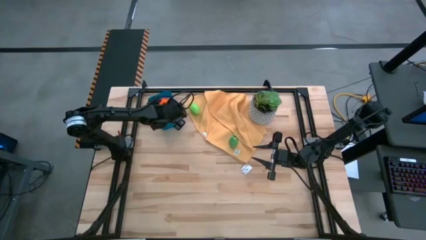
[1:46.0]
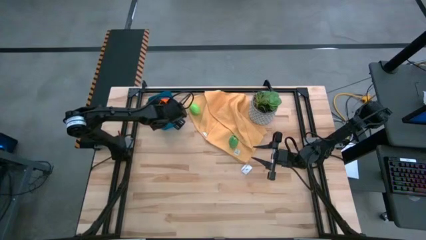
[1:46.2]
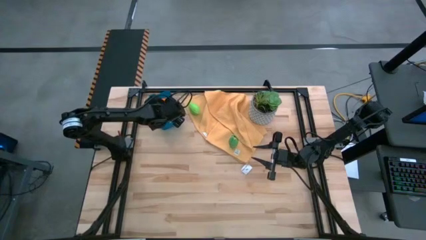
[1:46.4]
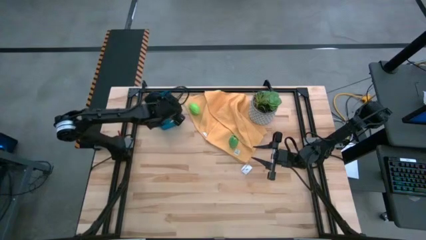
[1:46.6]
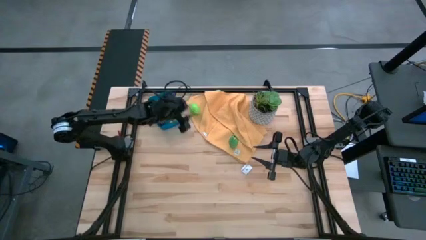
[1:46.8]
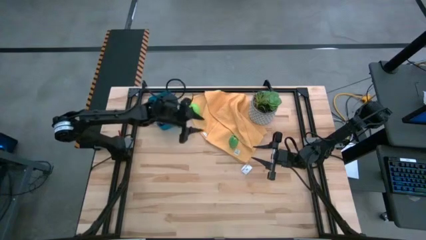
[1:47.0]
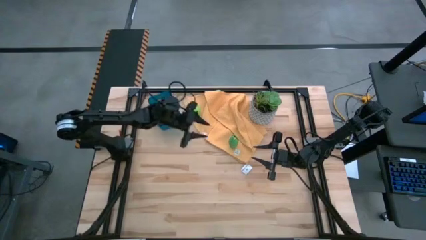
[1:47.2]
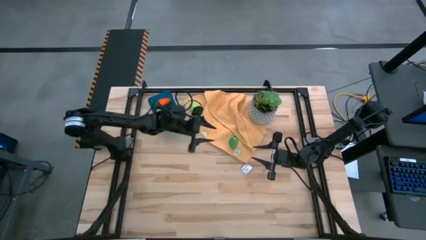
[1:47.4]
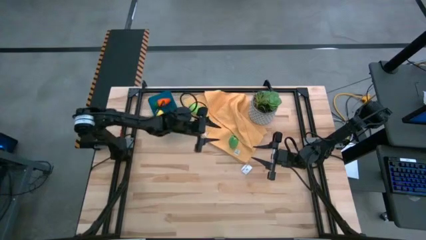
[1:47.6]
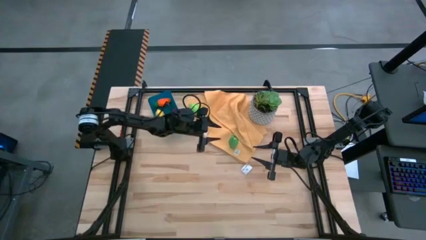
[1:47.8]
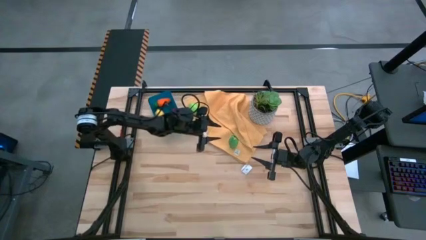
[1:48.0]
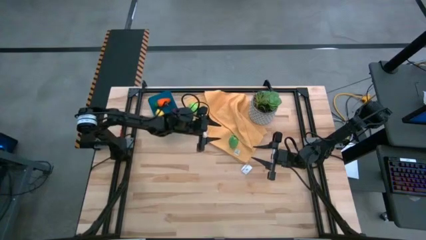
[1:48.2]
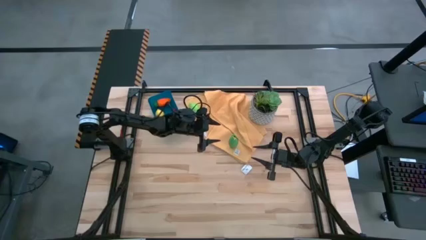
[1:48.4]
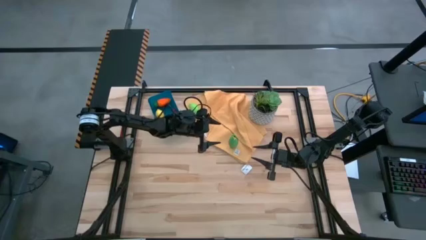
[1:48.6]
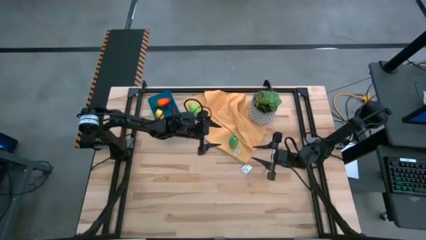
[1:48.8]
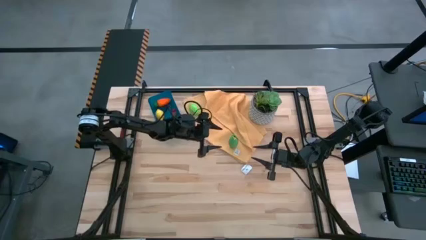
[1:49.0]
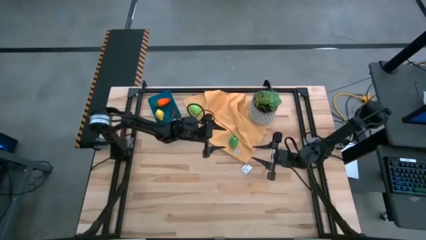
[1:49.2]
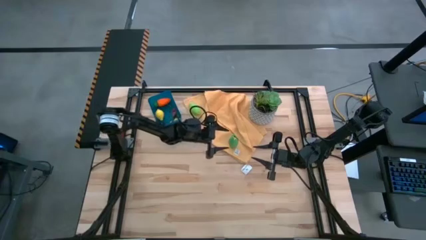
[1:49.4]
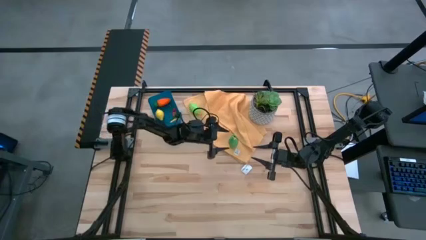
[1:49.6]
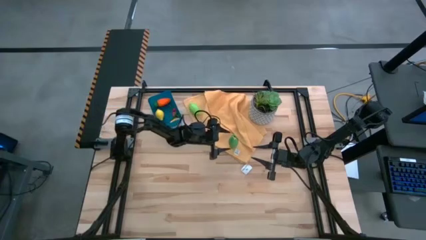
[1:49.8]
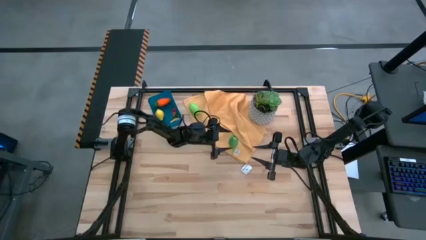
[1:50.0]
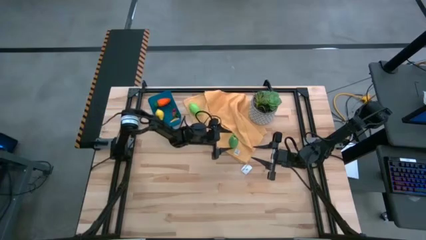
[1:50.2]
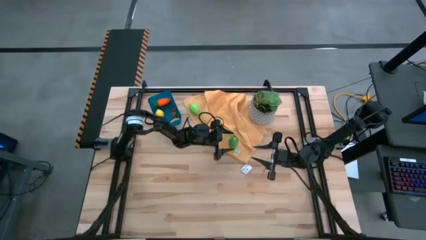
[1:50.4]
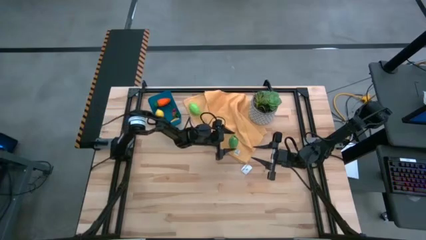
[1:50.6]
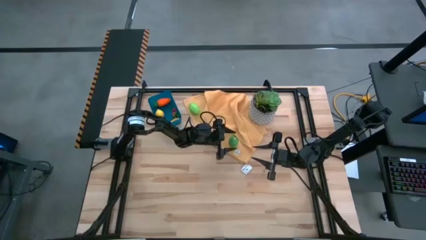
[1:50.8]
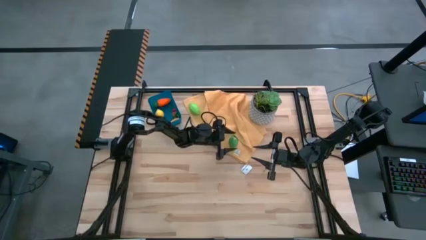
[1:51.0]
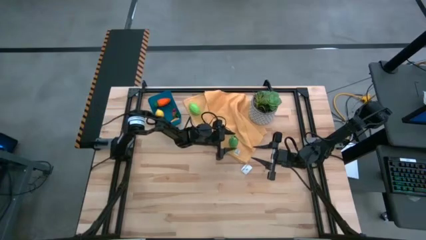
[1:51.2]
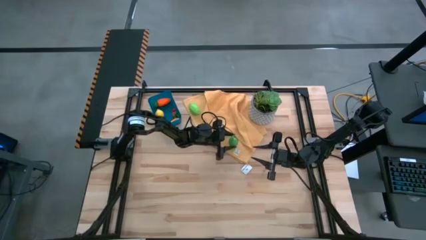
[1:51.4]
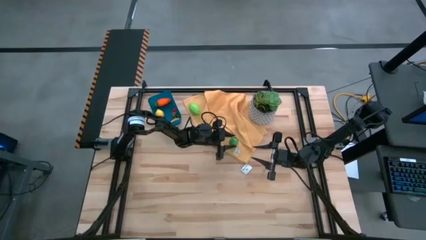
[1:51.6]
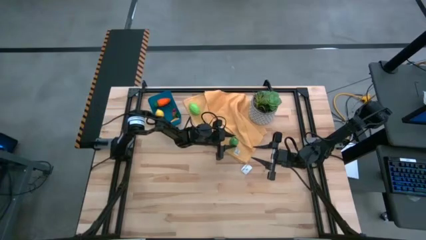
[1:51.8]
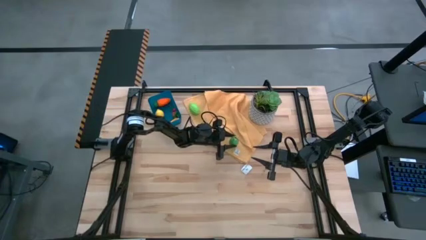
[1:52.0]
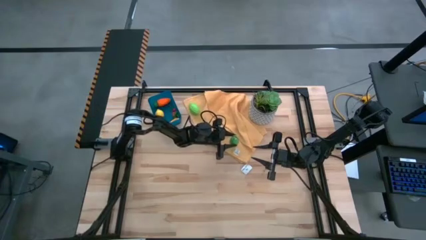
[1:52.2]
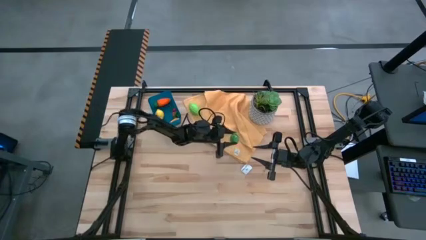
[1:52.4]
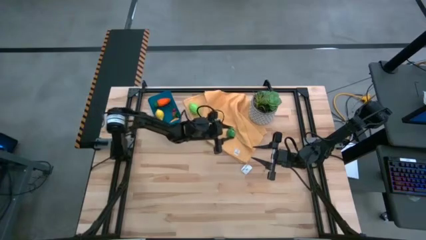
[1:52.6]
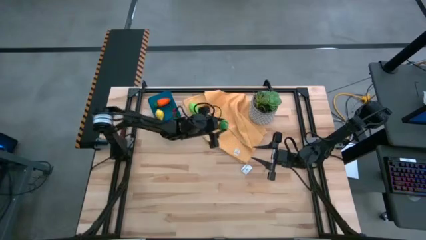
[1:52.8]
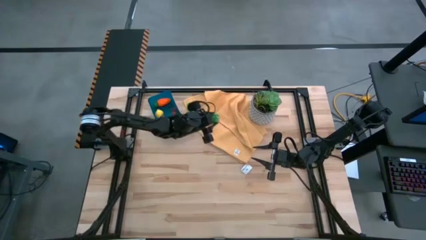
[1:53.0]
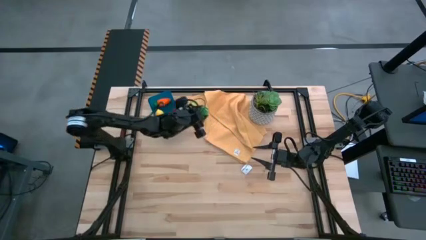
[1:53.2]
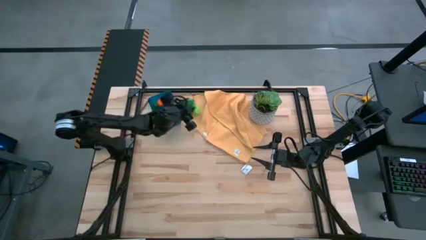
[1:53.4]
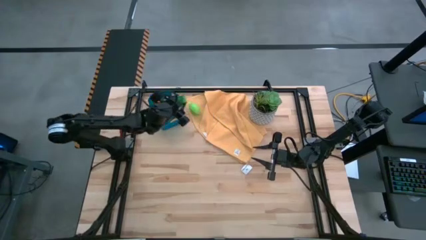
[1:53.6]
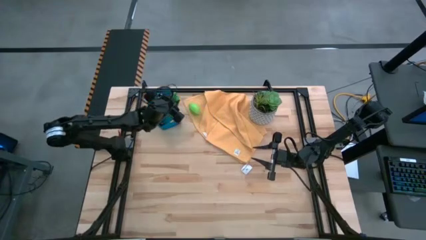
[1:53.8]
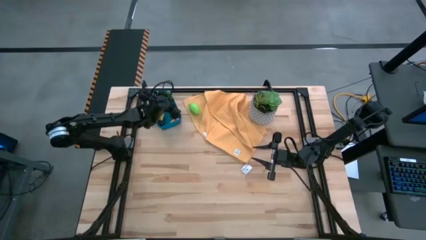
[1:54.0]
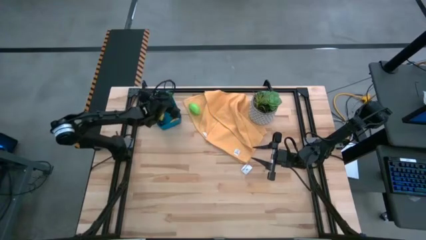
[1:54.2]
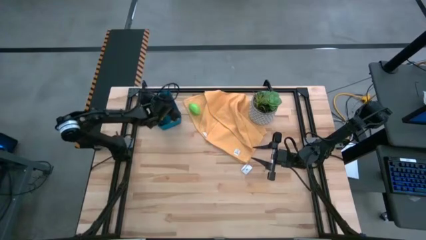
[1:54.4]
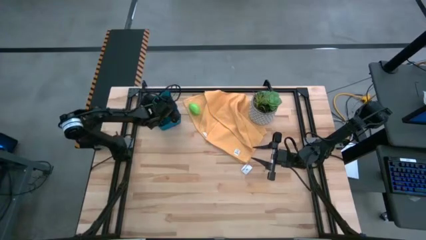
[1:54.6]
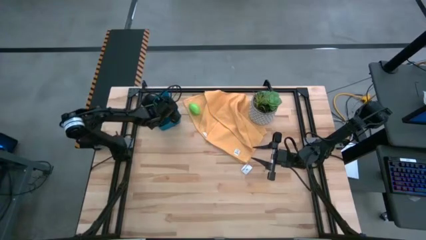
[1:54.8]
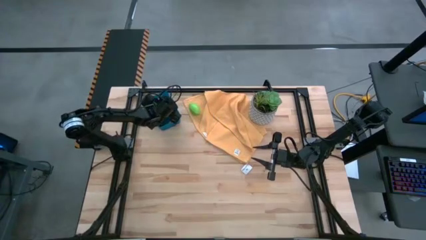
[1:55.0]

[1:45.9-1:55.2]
Task: Pick and placing Produce into tupperware
Put the green corn into the blue bin

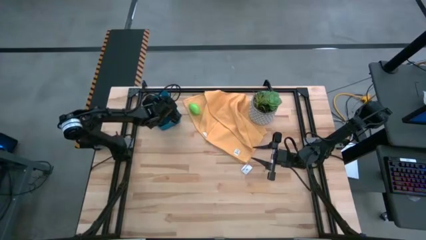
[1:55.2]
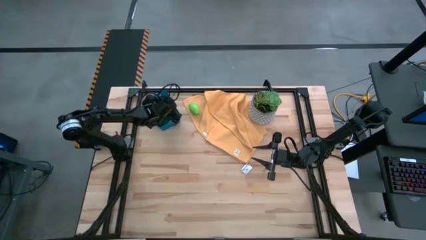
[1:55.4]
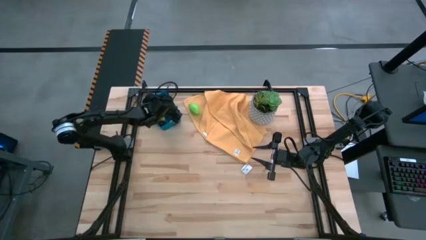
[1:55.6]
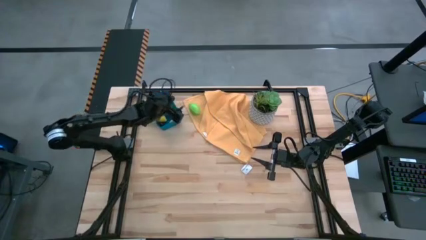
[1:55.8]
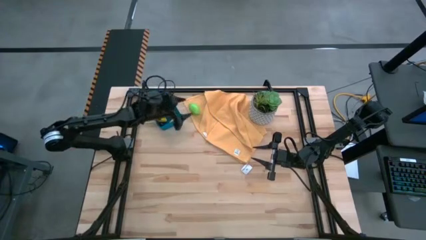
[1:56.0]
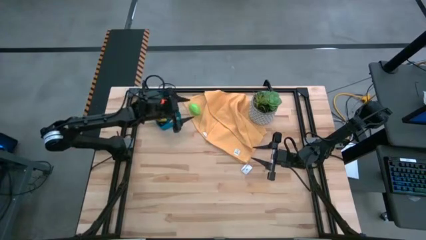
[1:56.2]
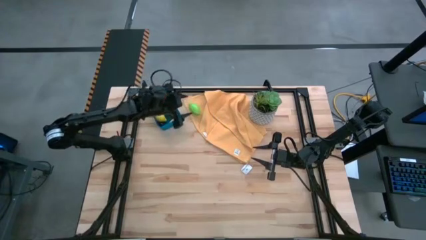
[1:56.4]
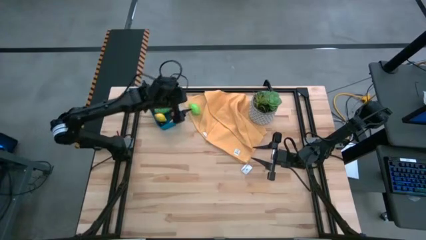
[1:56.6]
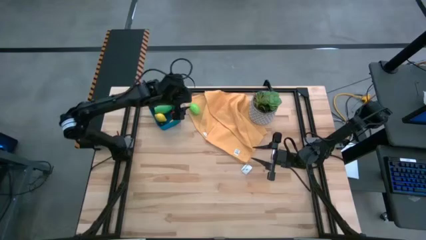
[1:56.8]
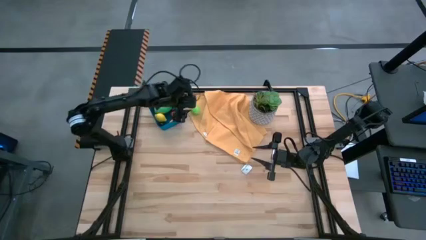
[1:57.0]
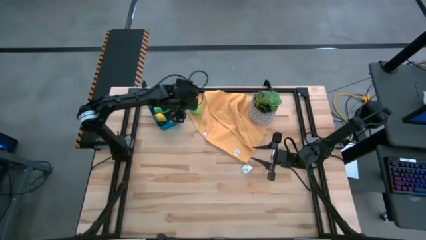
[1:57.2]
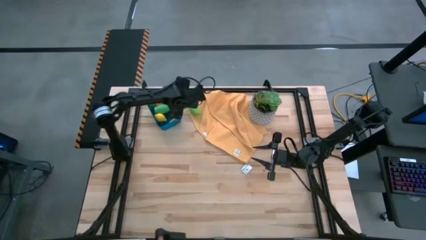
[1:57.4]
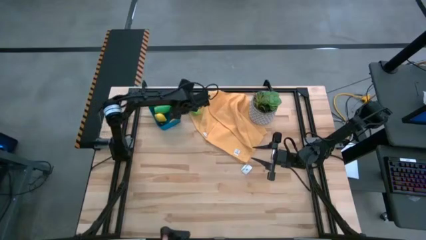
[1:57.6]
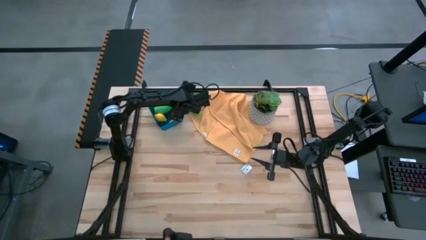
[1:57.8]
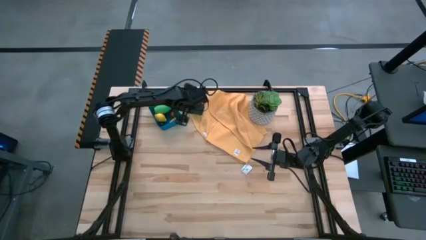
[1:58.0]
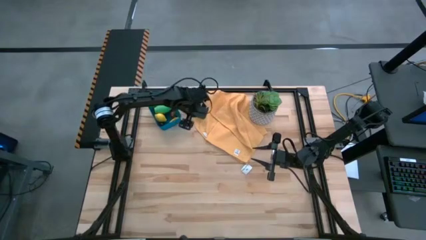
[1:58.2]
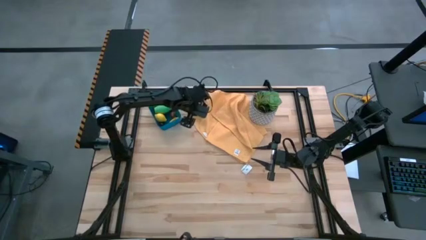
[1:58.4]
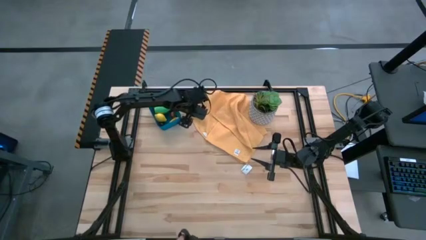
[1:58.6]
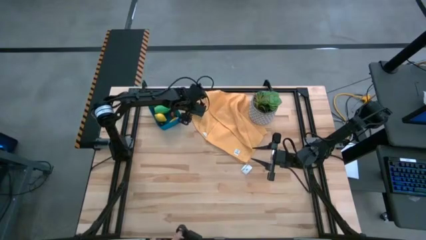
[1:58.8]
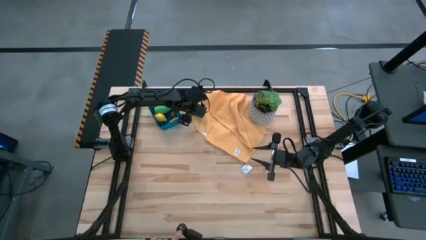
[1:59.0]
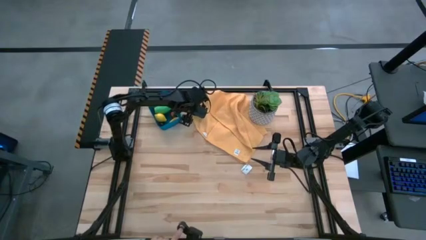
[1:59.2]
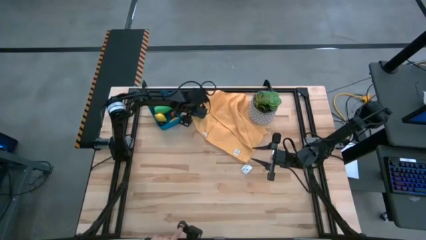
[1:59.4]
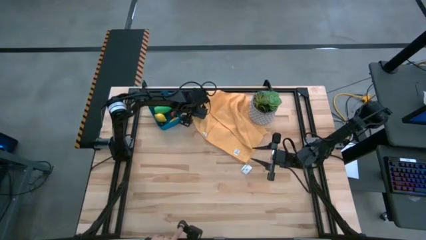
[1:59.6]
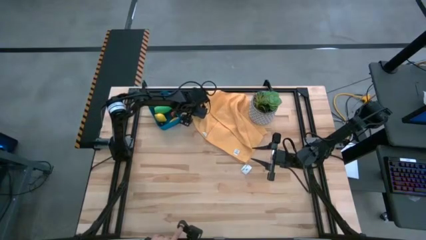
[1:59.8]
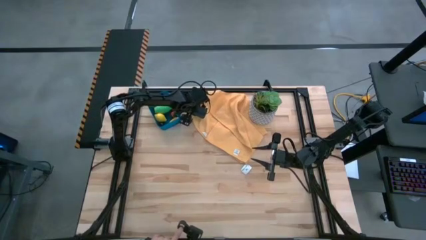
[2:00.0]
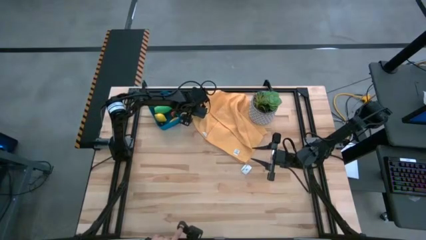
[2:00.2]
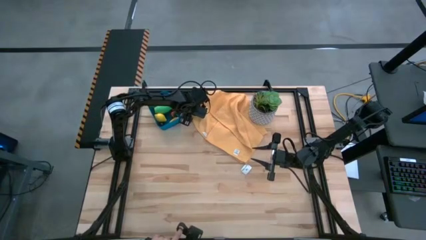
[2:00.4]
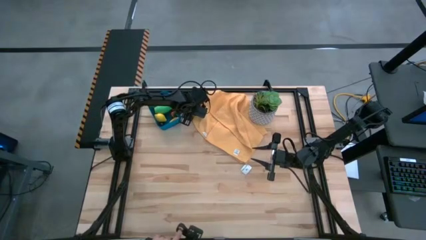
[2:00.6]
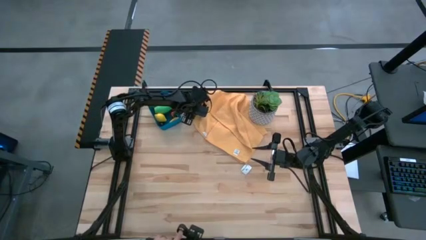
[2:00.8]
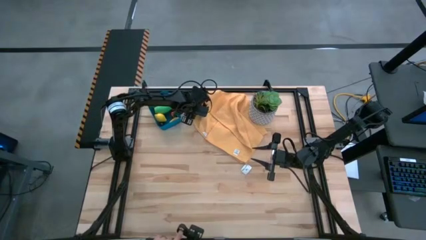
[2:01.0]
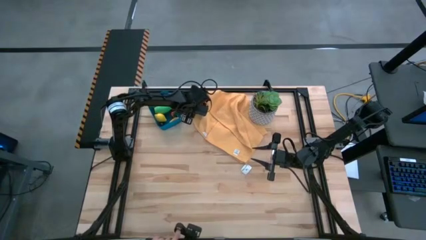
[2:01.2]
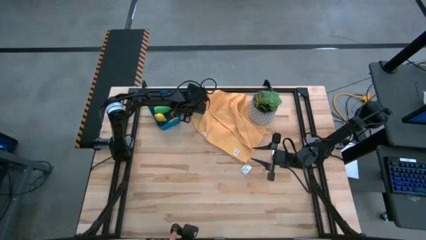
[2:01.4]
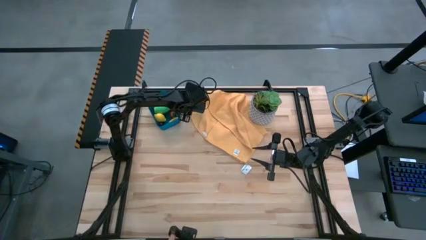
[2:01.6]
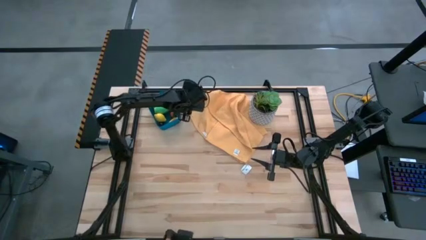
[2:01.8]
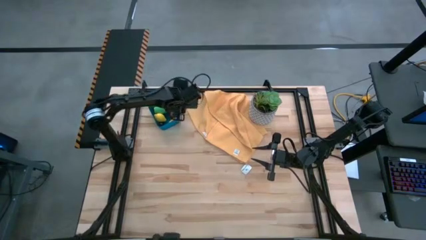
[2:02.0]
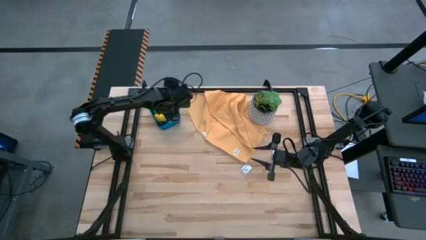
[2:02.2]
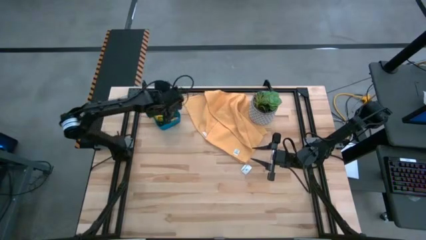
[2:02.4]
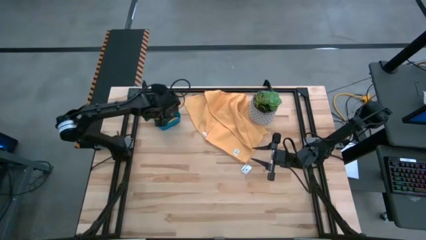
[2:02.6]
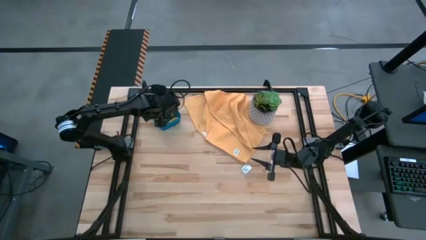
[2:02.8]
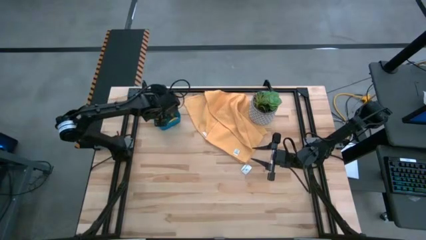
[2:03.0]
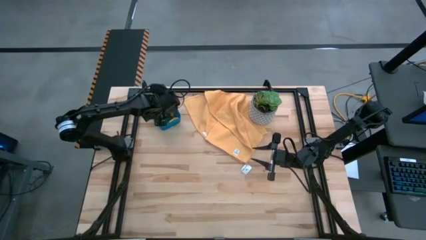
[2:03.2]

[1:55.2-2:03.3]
Put the melon into the blue bin
